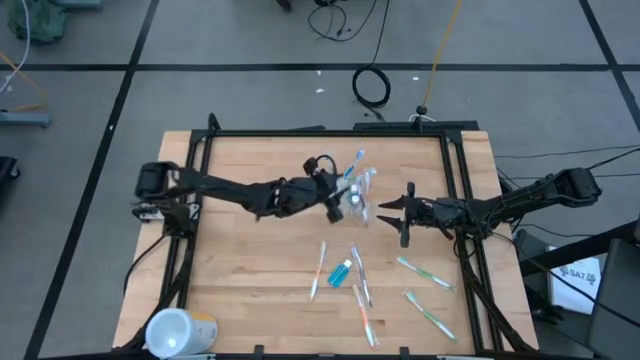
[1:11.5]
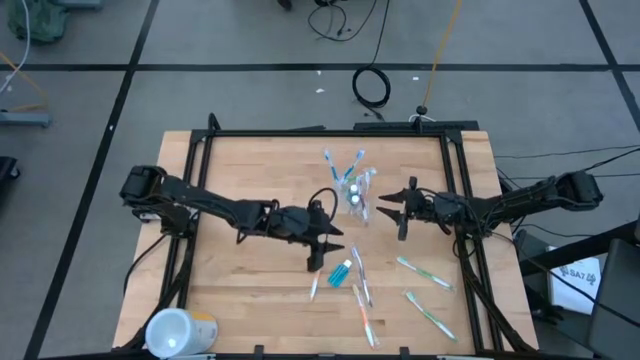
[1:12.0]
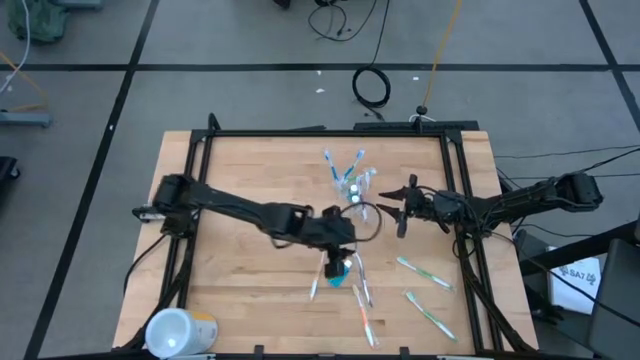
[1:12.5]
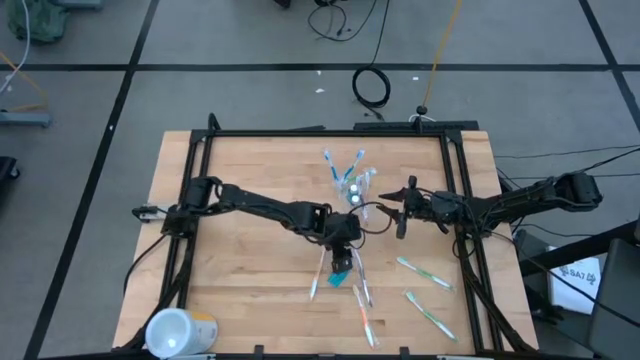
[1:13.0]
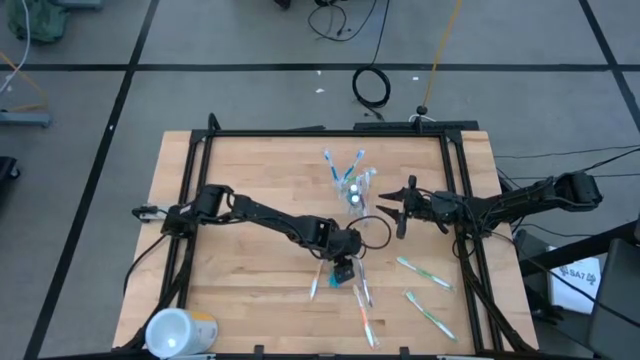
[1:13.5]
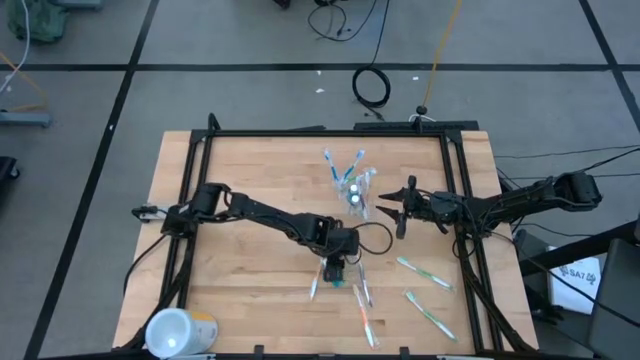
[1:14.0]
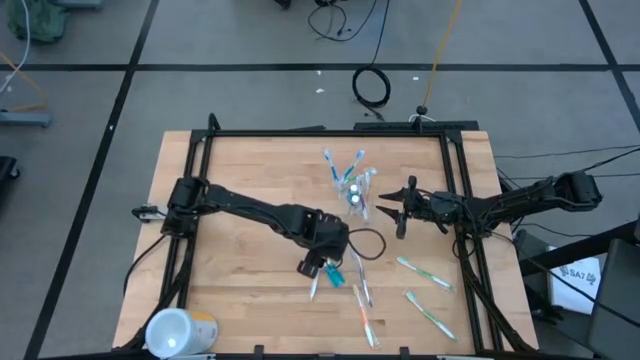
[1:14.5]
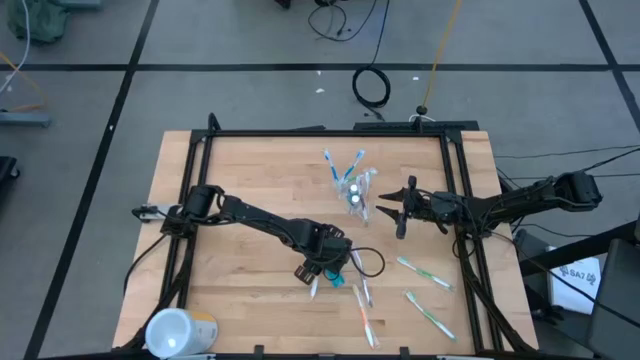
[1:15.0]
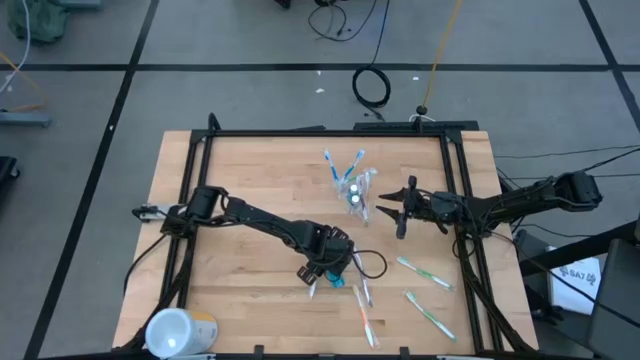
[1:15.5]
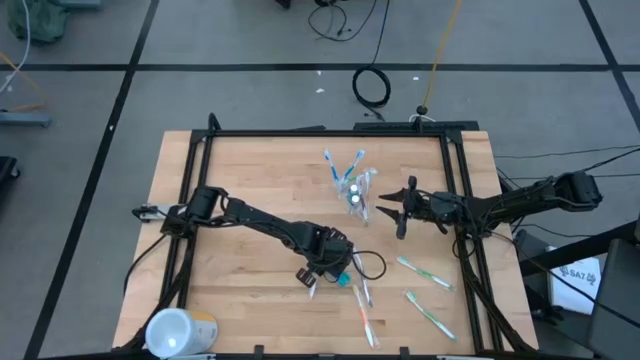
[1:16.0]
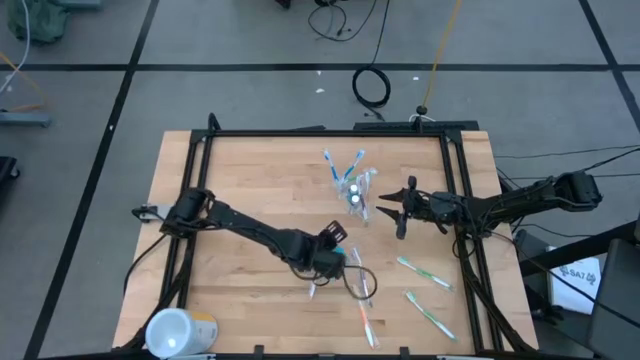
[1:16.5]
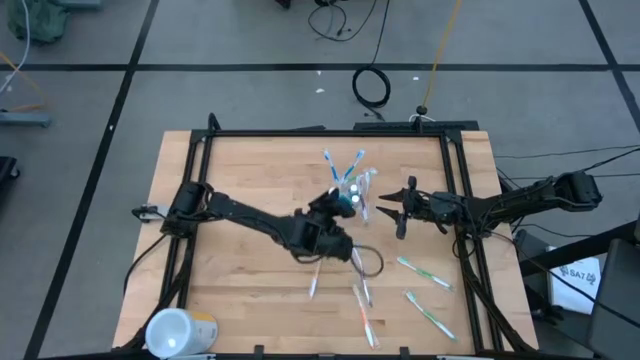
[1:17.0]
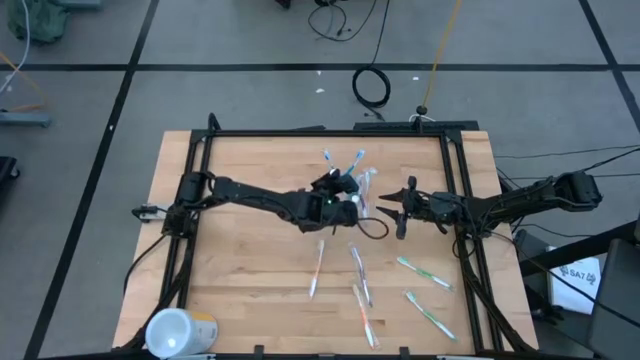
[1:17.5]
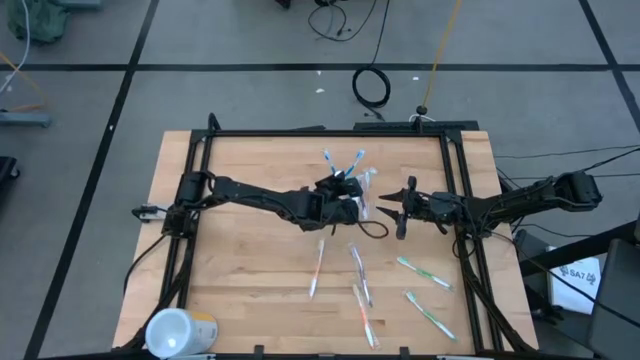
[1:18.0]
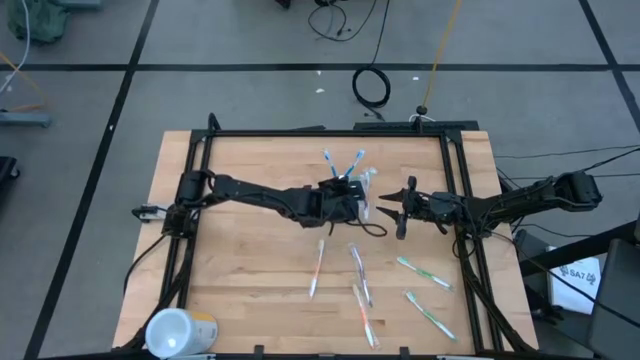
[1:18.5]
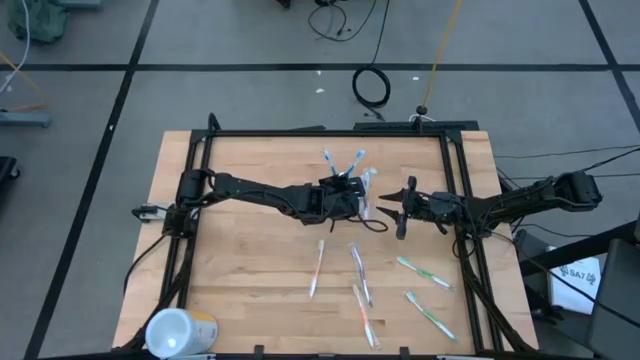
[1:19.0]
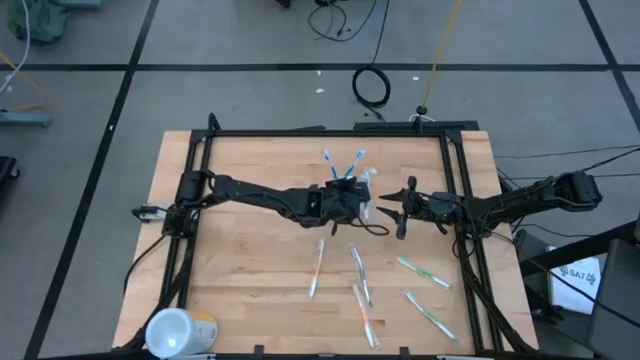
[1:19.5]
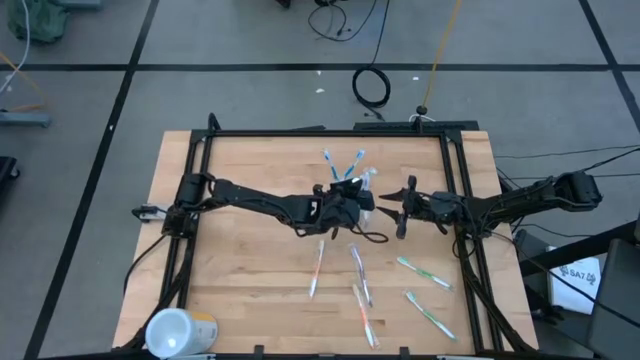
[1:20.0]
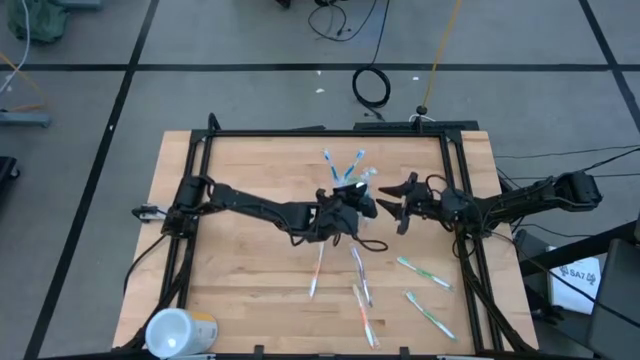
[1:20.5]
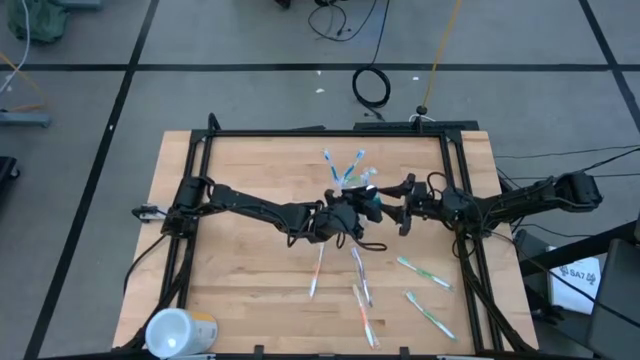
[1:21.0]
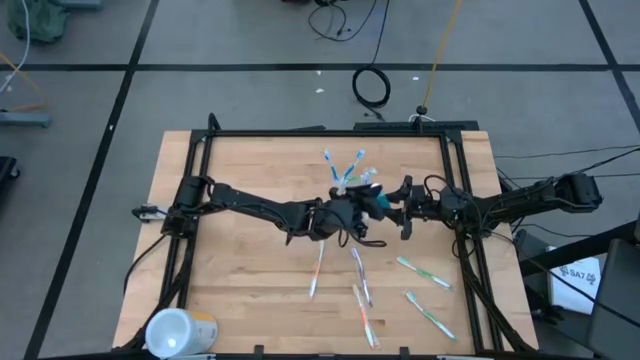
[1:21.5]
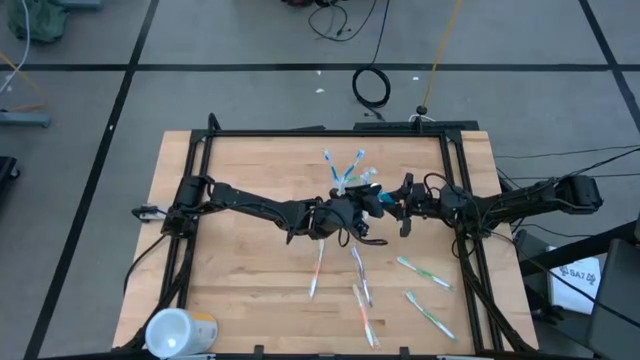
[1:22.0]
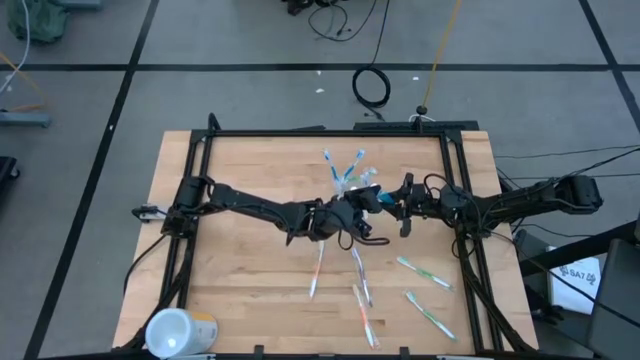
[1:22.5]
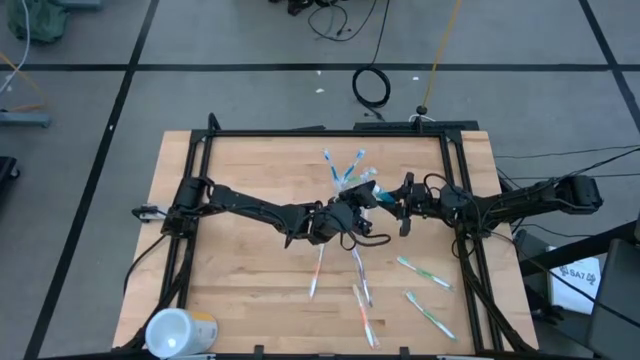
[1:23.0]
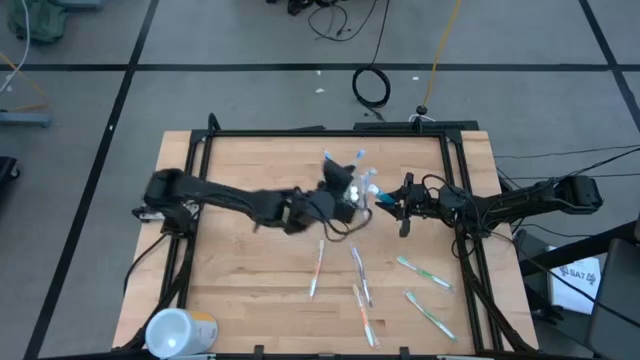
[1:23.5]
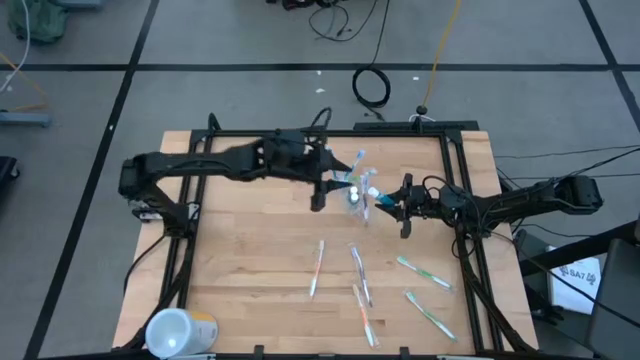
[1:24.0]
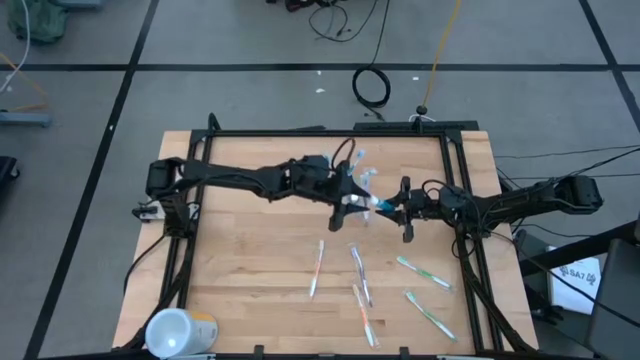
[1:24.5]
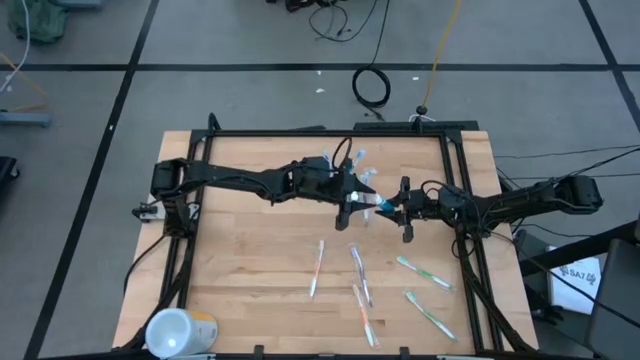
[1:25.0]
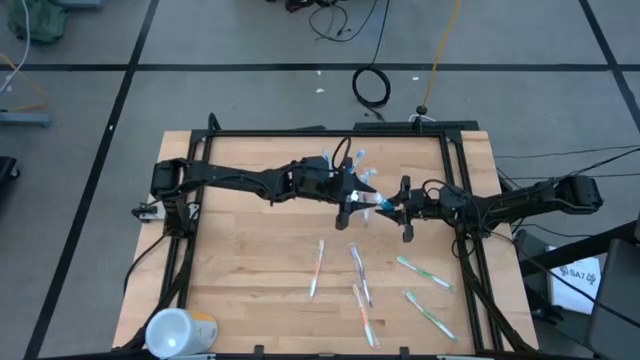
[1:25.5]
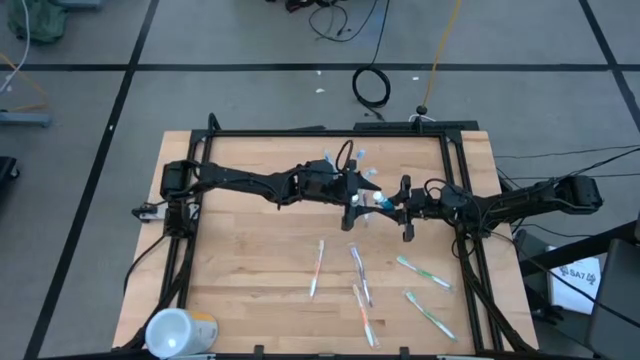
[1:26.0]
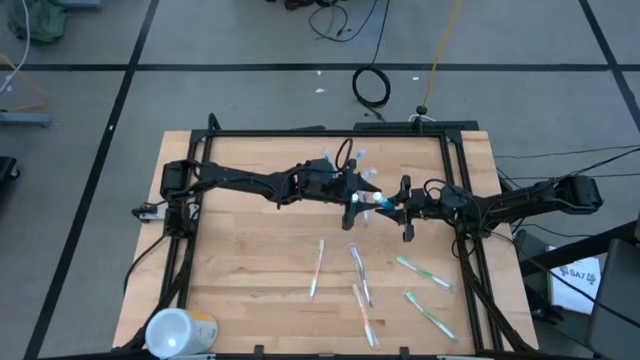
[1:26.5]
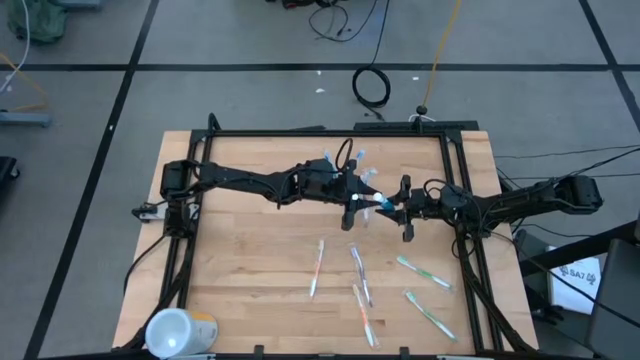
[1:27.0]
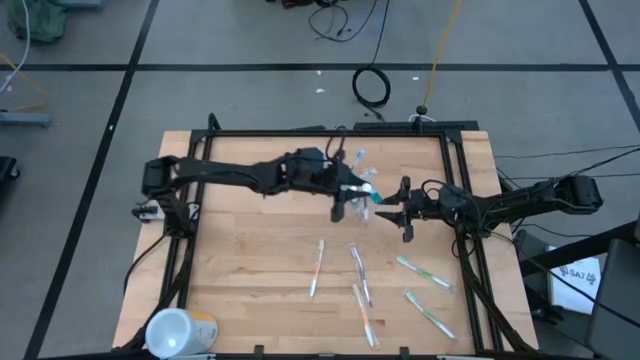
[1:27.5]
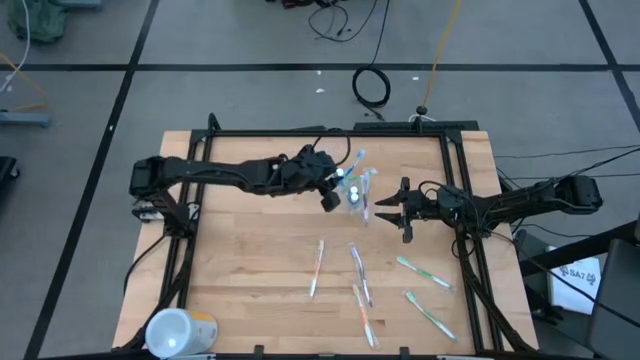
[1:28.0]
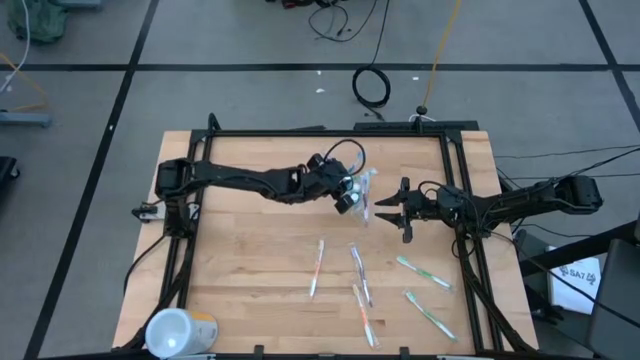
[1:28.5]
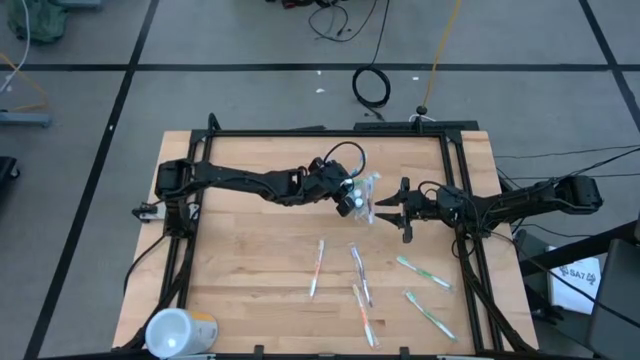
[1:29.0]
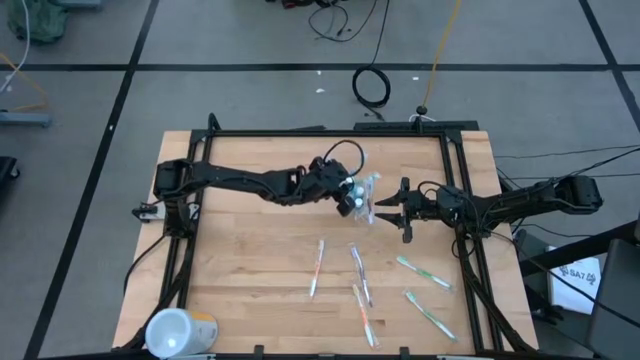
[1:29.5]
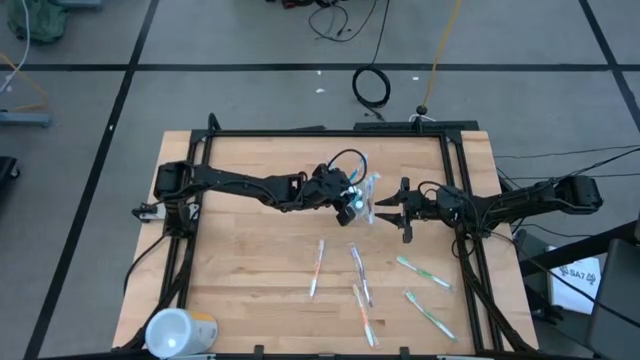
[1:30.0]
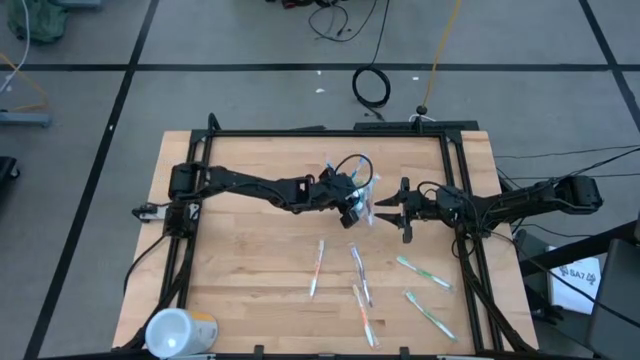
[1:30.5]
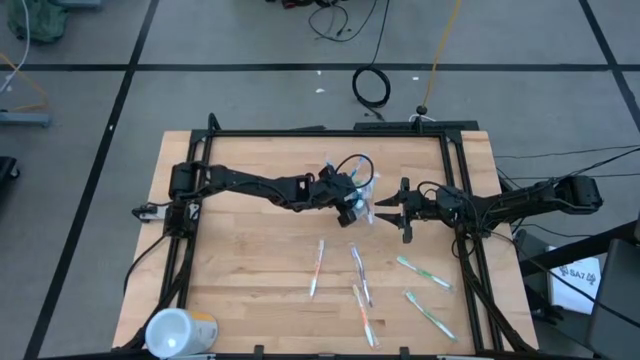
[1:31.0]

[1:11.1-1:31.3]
Task: Pick & Place toothbrushing station
Put the blue mouthwash into the transparent organizer

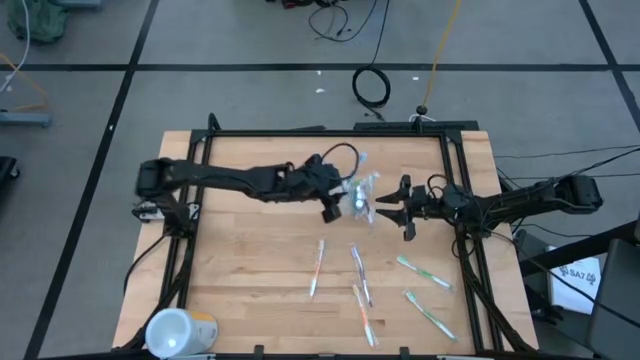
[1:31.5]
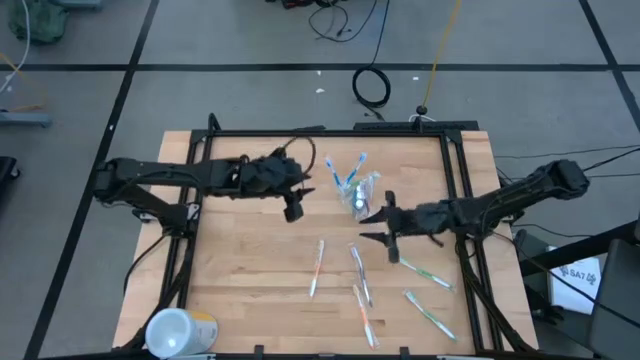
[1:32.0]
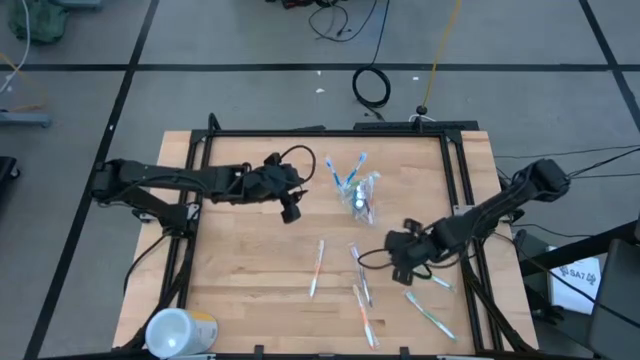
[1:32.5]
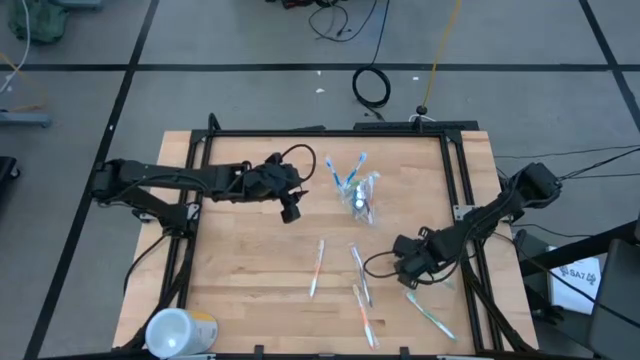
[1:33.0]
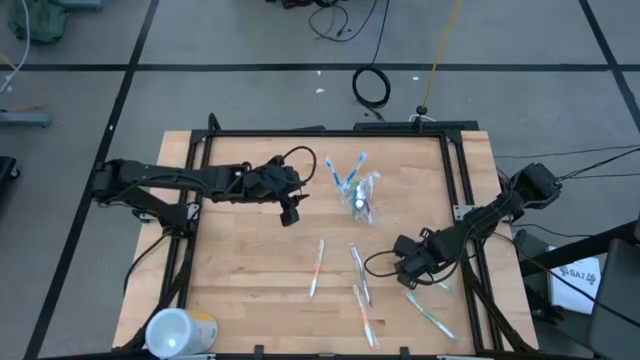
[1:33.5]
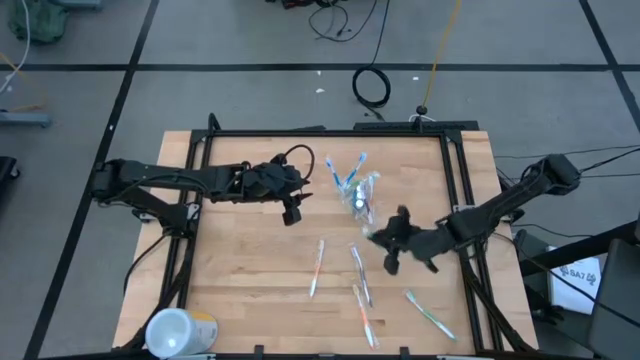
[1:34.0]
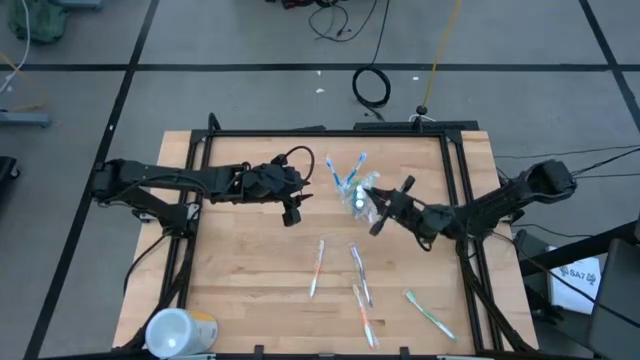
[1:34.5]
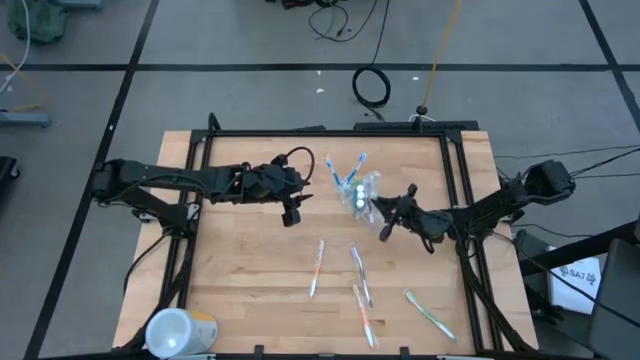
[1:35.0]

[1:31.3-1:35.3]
Put the top green toothbrush into the transparent organizer
